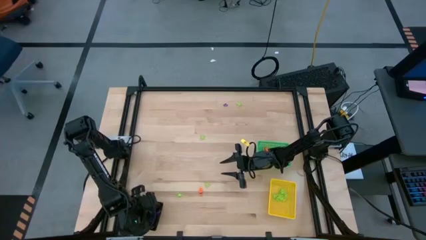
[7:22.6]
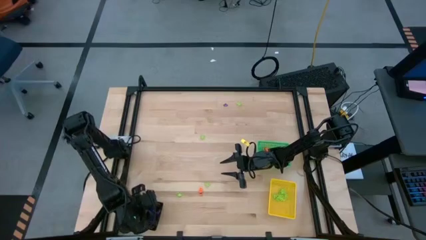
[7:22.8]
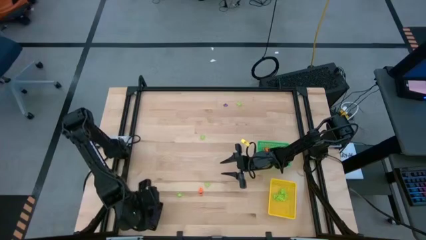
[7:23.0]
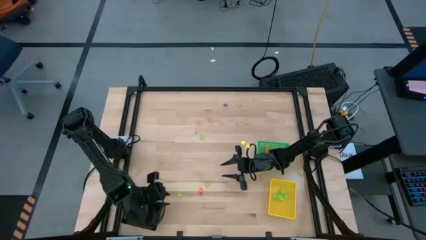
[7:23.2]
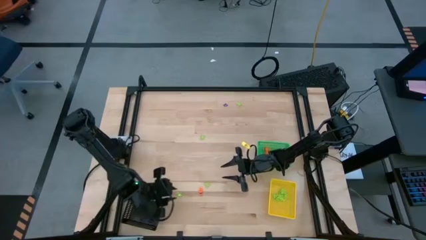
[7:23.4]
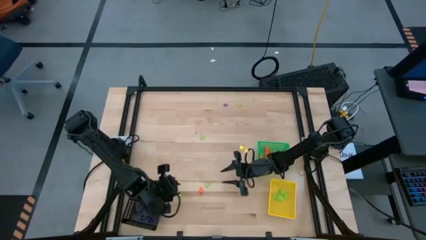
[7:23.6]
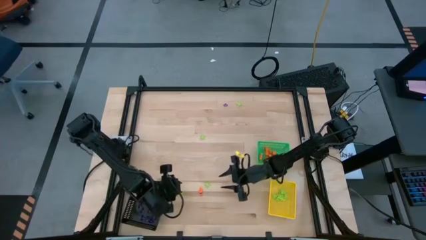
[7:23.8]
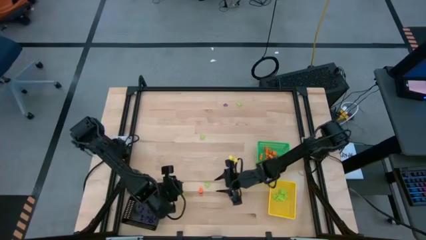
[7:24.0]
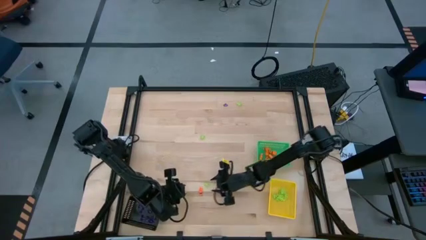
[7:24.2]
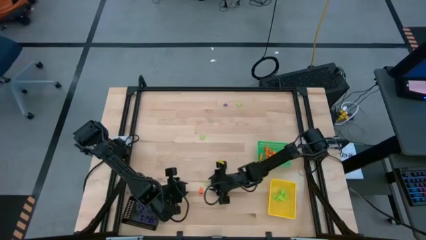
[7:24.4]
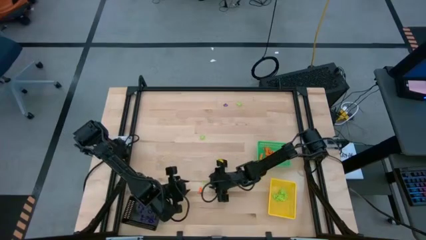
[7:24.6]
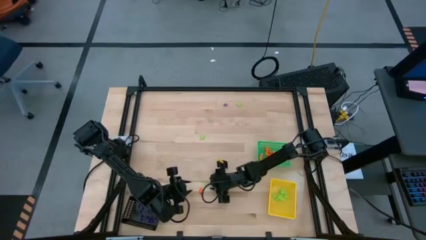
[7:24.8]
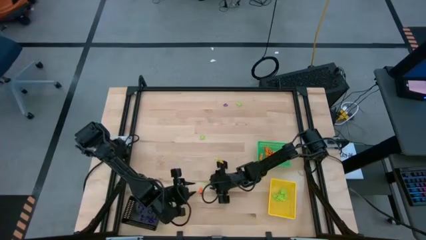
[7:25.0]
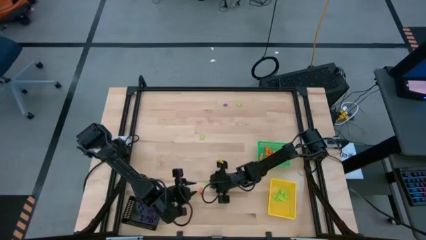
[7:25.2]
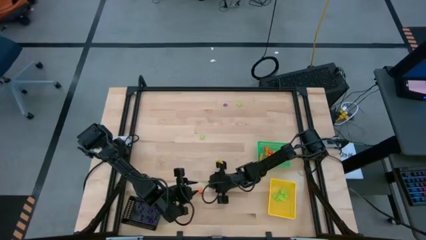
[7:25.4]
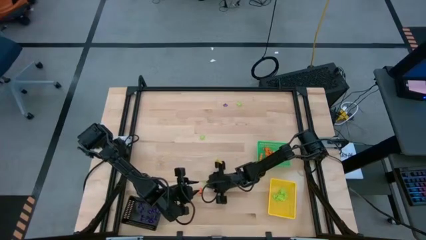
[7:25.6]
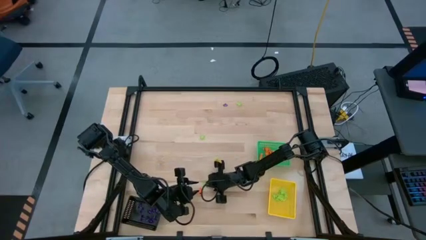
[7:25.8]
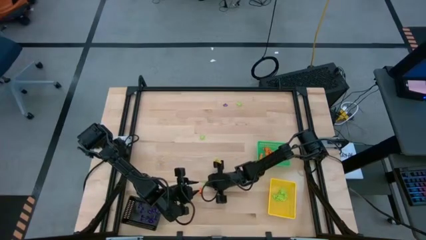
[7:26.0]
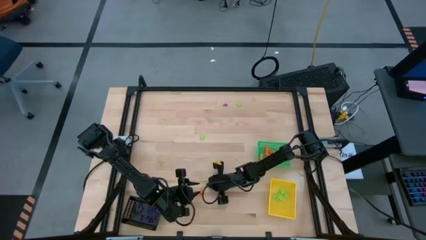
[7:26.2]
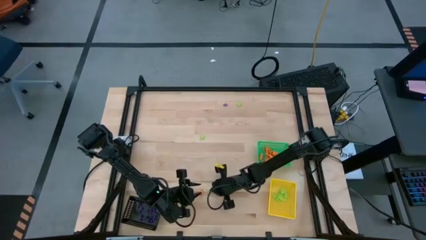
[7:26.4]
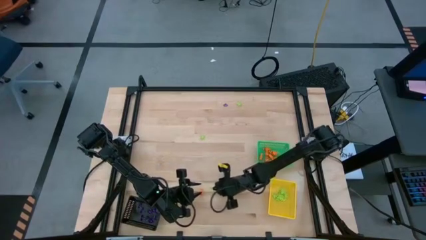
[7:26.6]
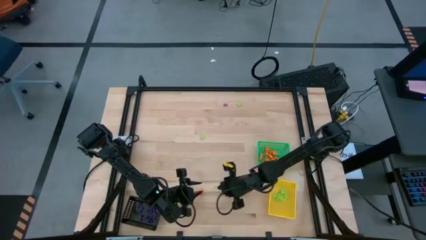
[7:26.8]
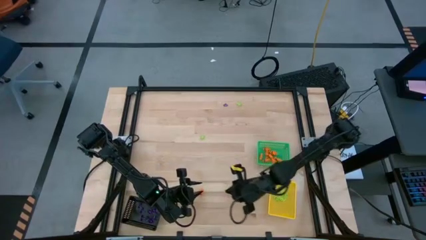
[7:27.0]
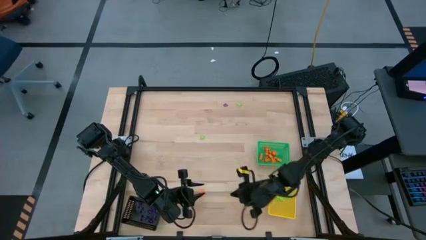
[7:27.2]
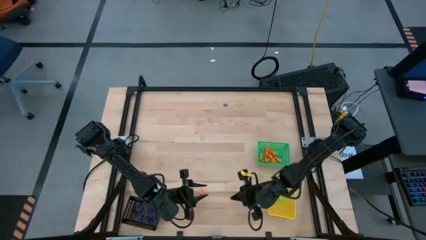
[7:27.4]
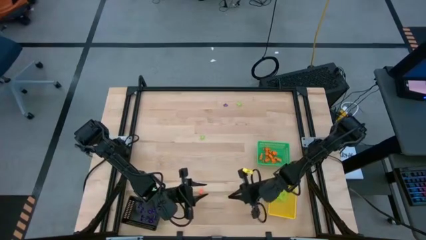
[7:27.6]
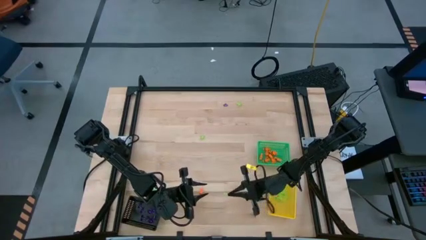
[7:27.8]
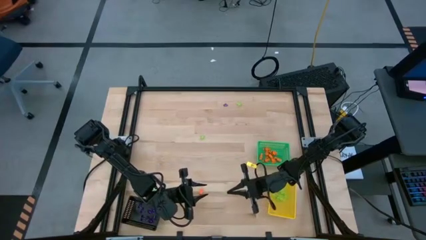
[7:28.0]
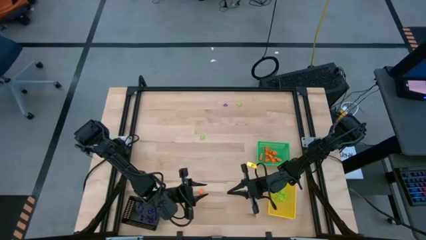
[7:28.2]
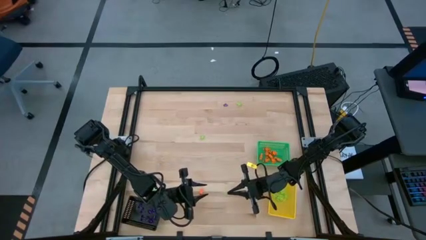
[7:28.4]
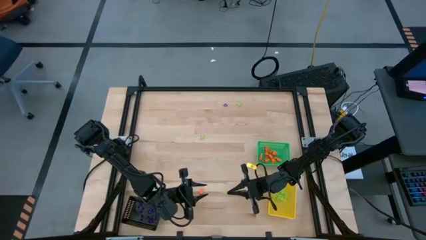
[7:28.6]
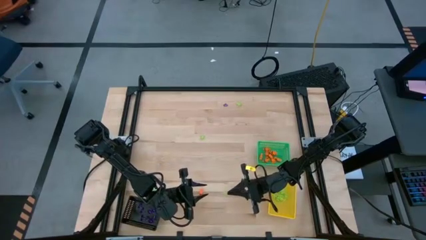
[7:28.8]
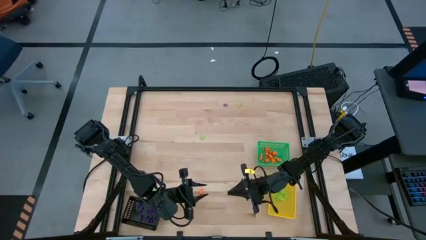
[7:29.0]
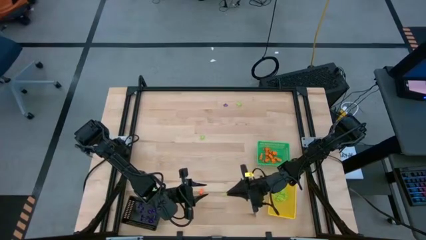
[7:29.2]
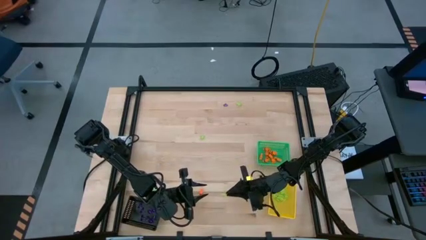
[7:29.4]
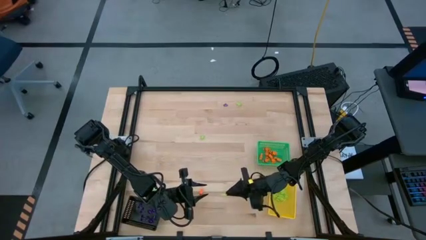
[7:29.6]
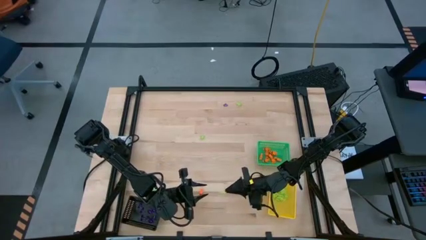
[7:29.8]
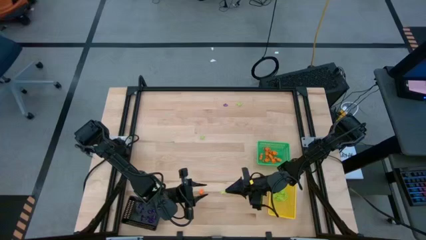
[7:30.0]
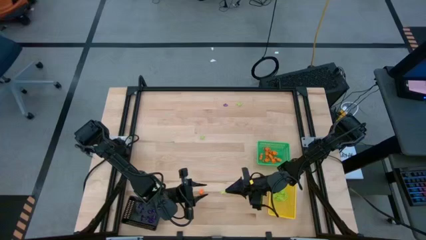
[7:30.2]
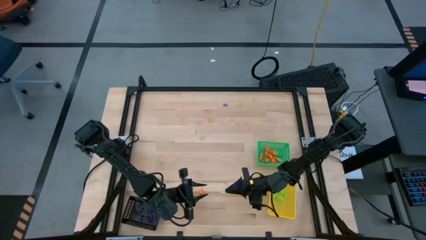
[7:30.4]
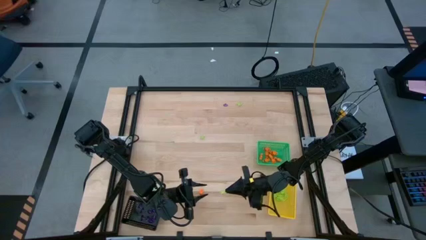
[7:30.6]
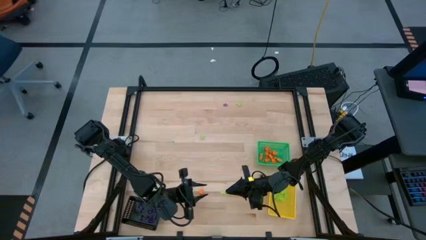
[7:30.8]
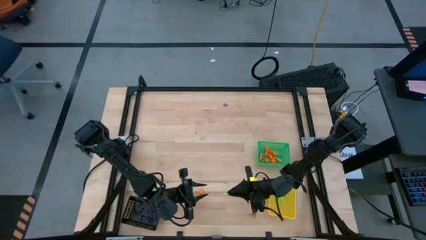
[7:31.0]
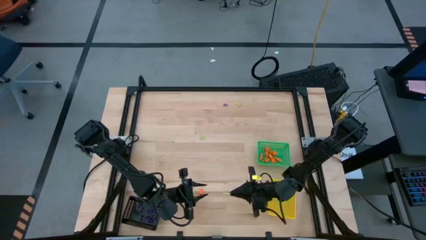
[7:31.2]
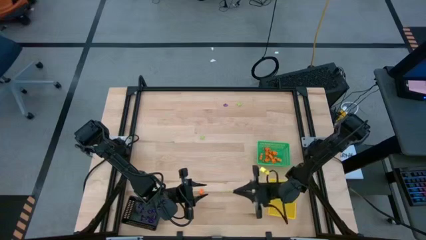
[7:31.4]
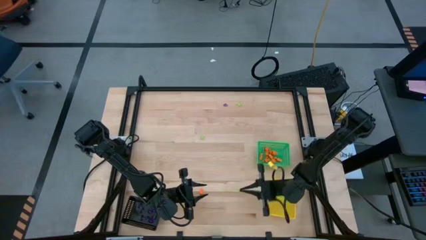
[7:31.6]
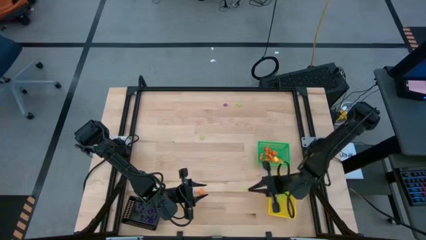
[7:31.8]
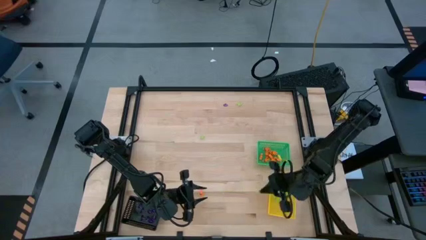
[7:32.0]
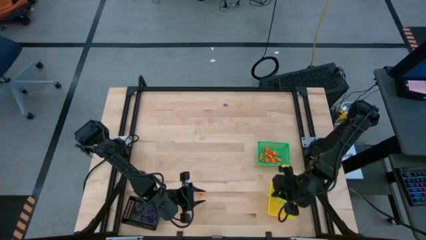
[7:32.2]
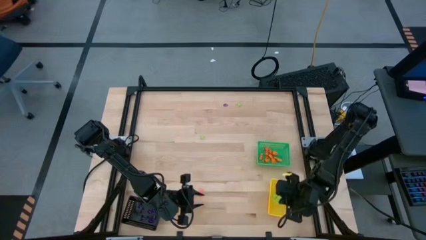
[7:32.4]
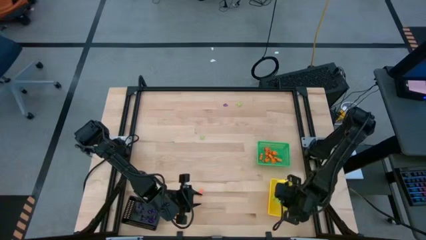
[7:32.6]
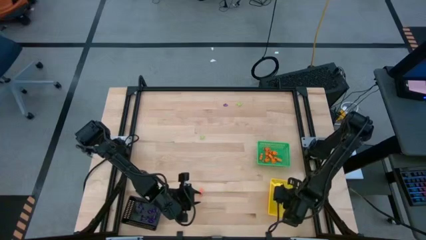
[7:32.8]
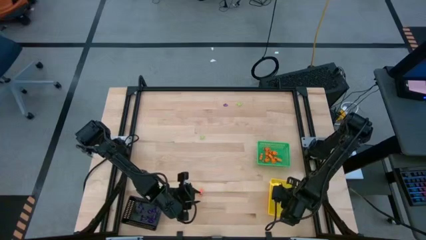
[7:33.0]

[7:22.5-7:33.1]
Task: Sort Halloween decoration
Put the green spider toy into the yellow bin
